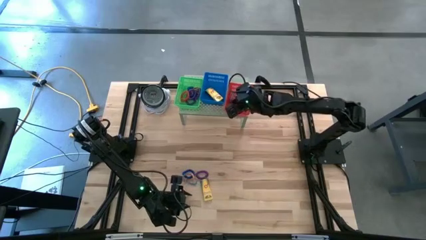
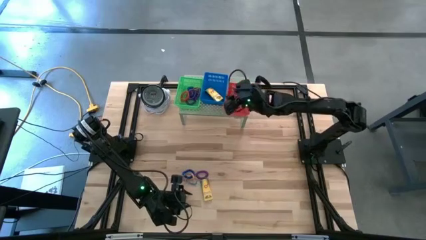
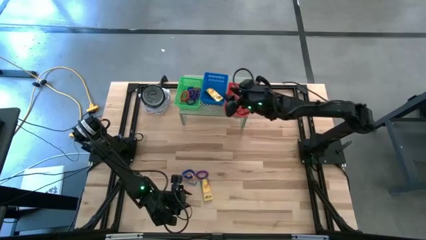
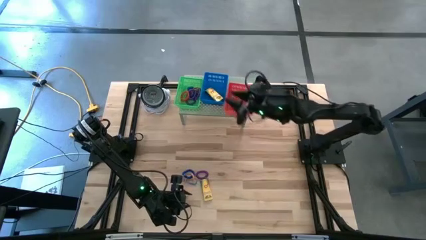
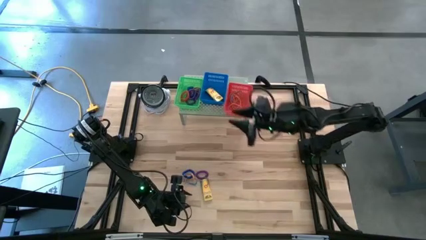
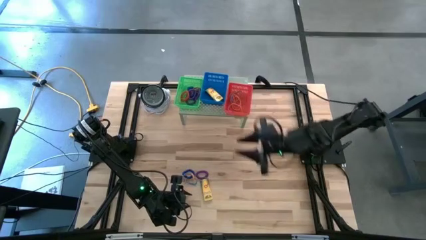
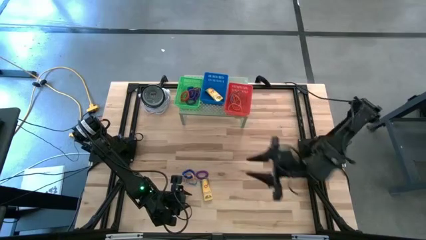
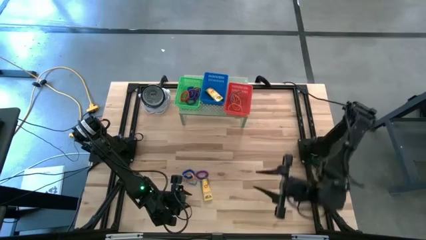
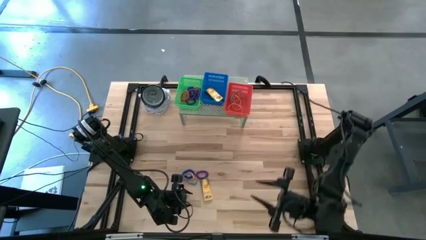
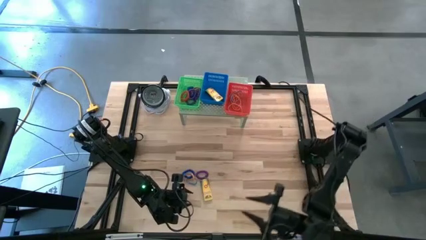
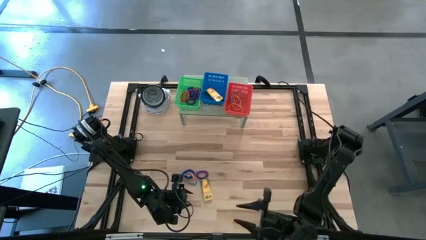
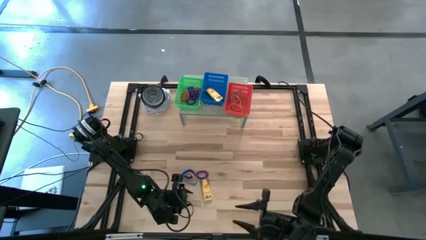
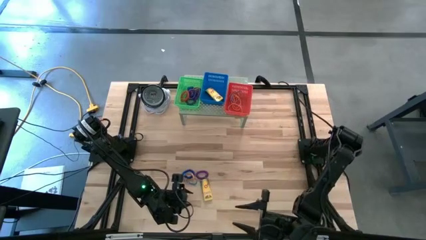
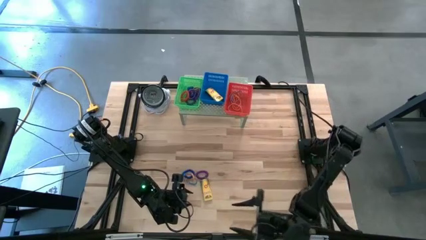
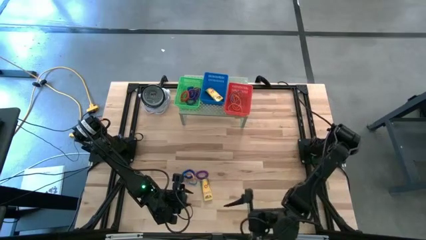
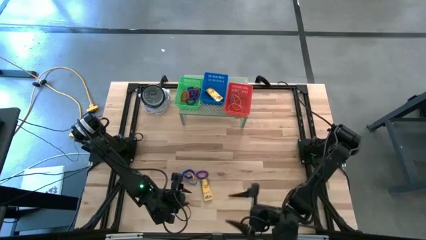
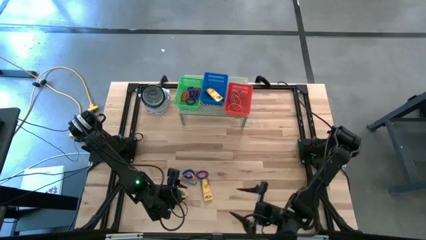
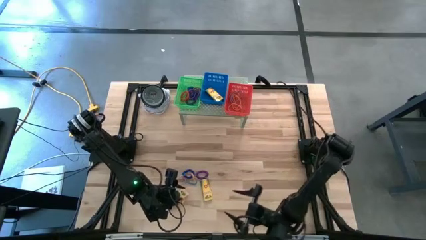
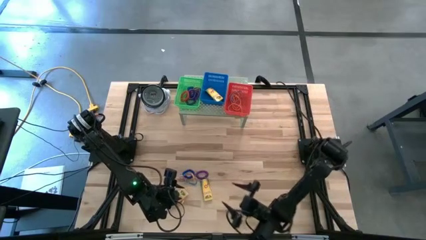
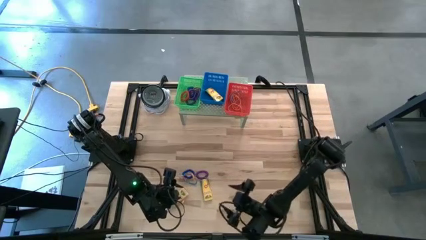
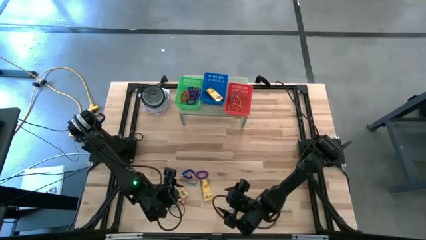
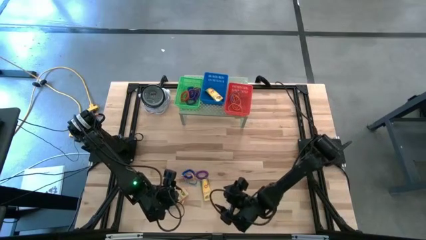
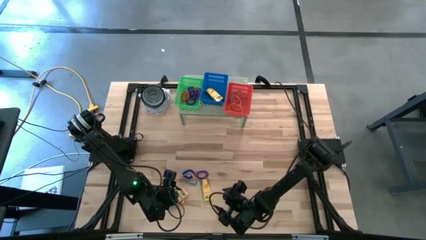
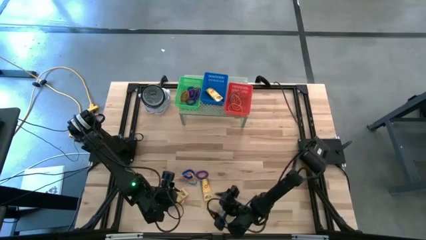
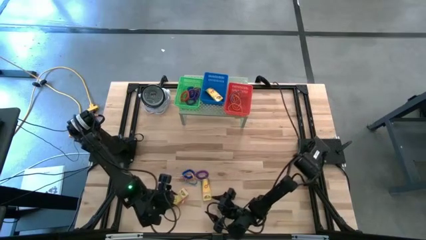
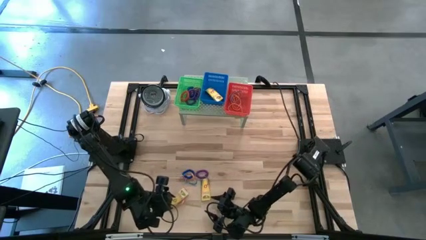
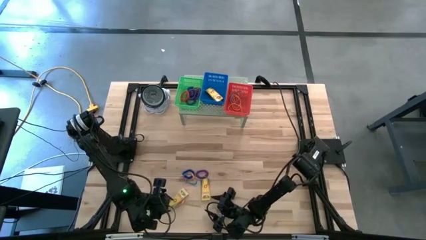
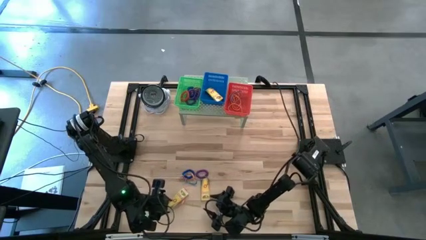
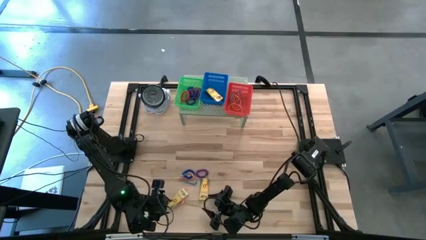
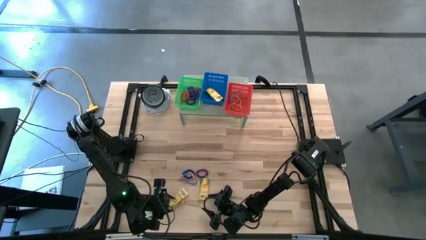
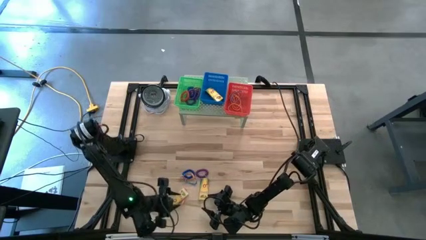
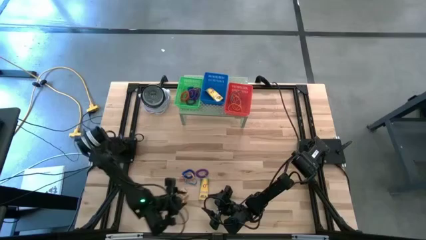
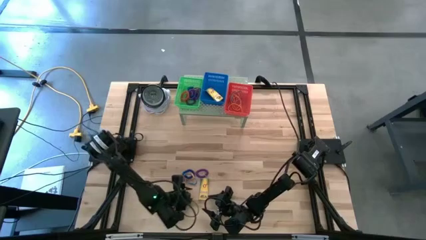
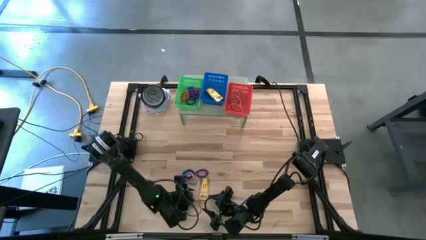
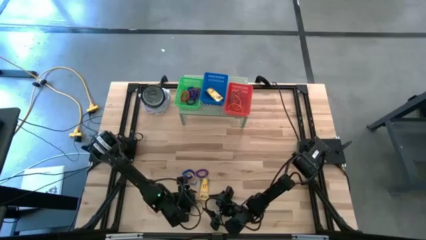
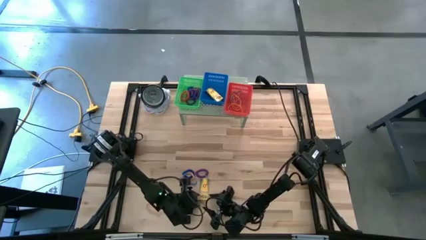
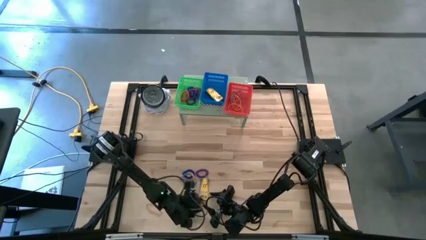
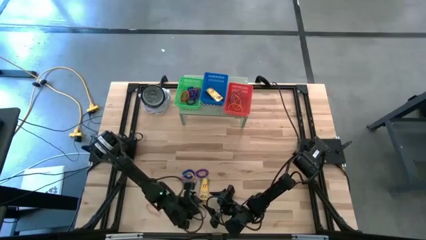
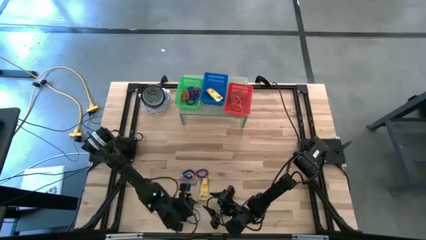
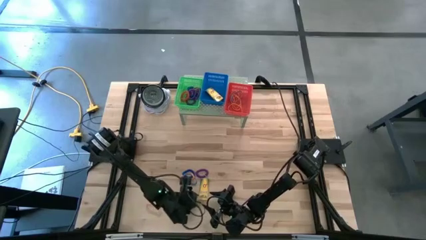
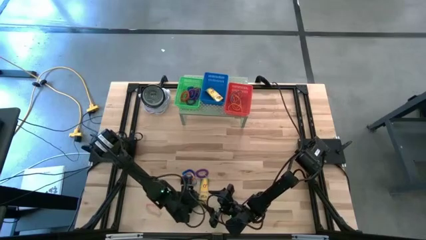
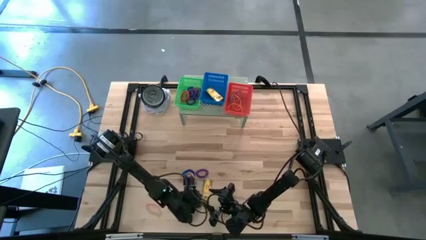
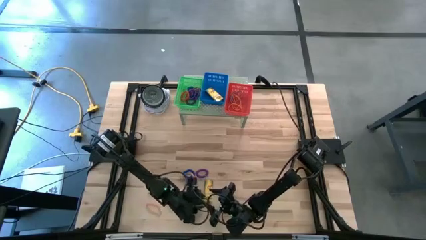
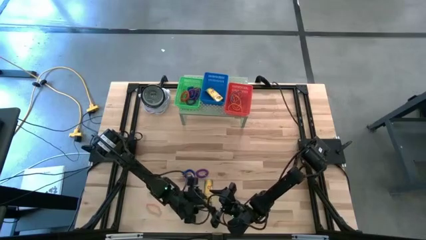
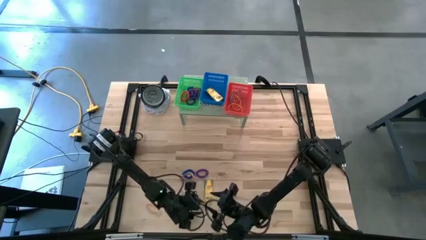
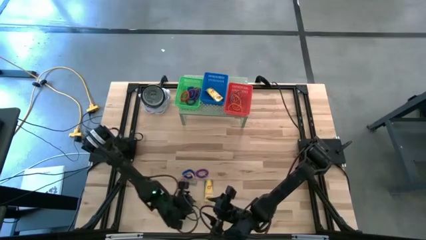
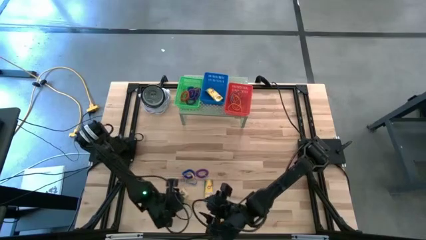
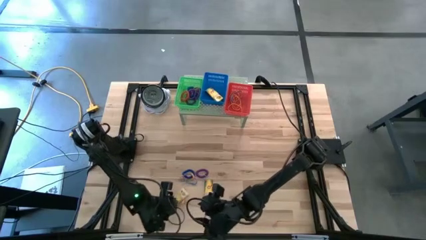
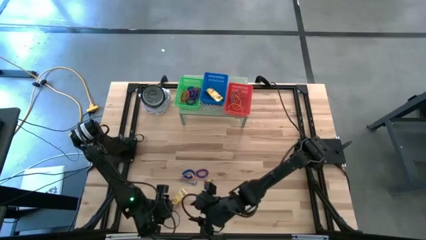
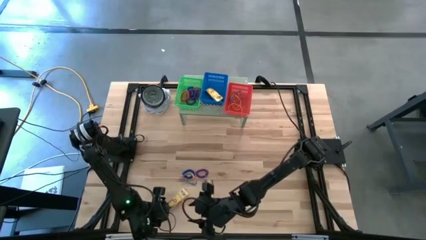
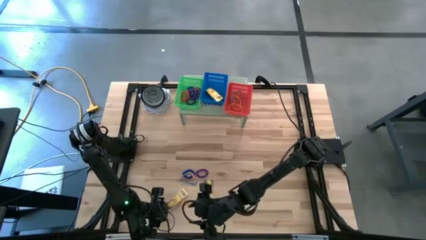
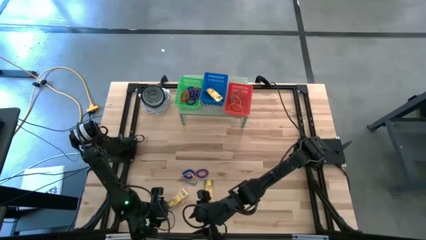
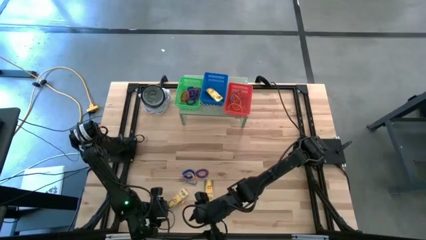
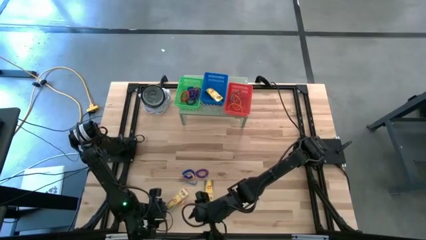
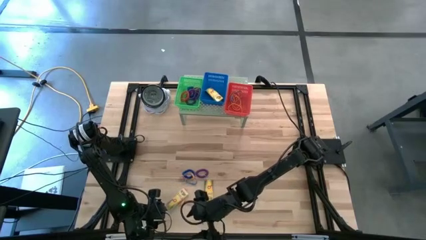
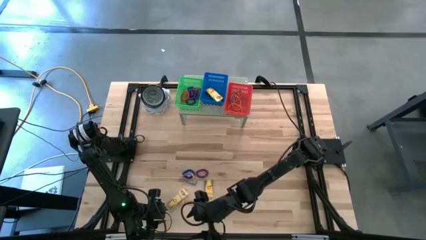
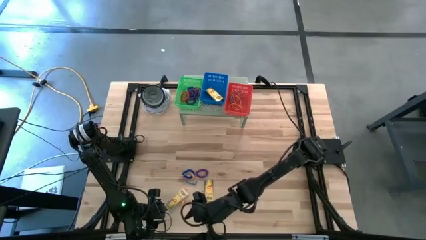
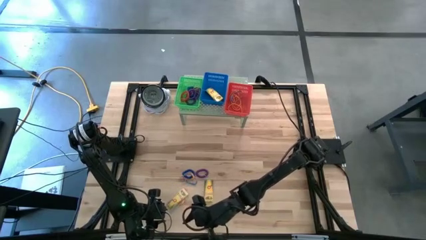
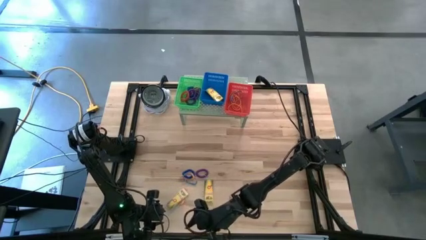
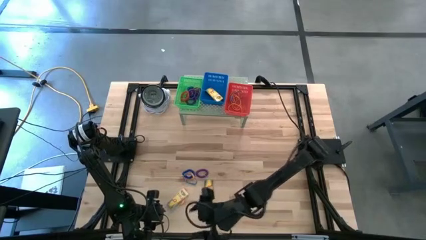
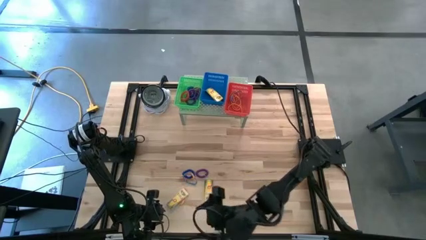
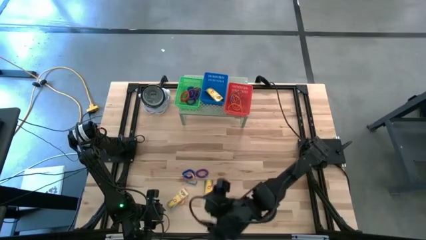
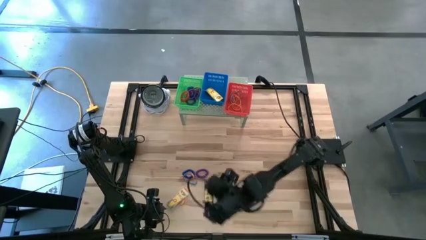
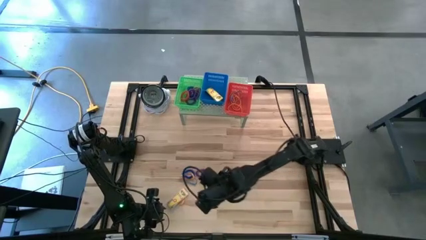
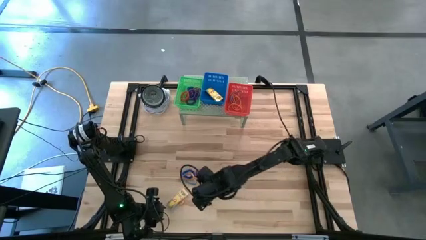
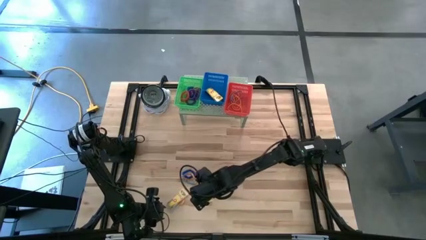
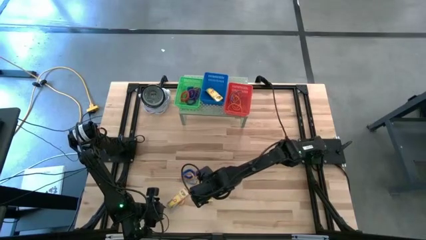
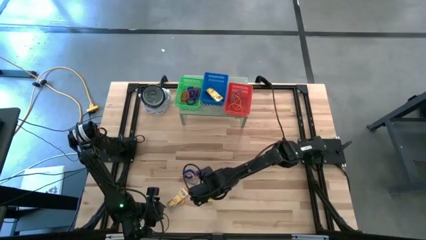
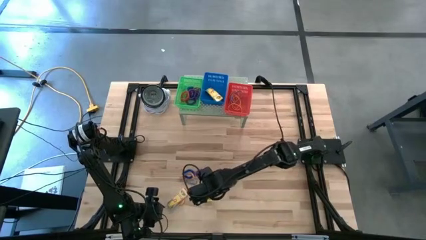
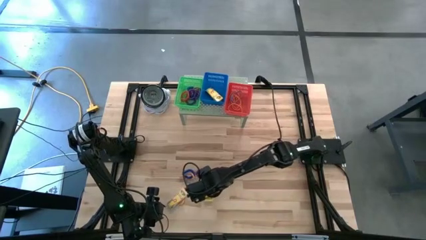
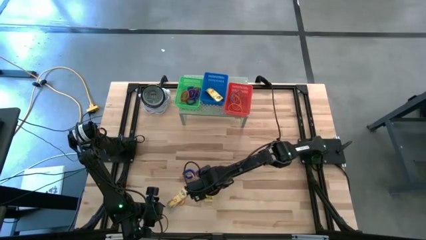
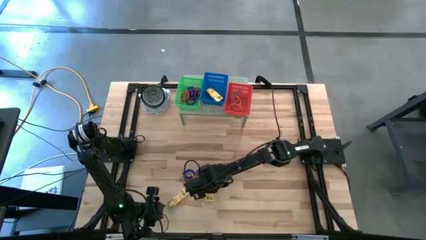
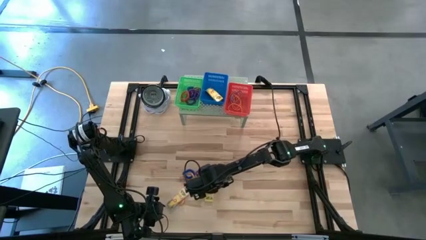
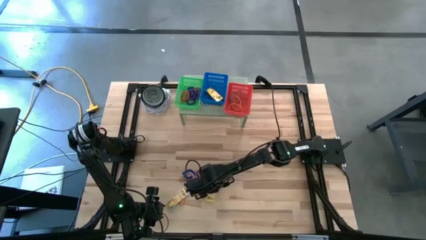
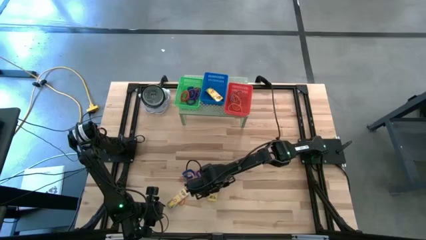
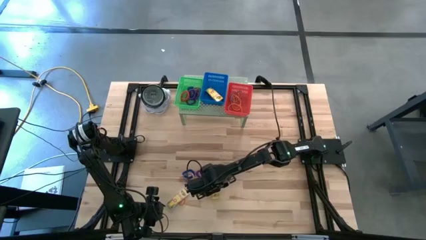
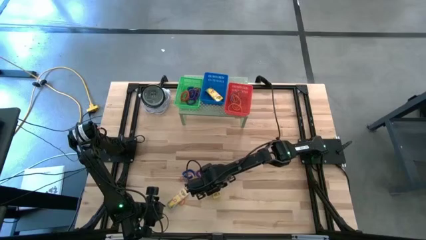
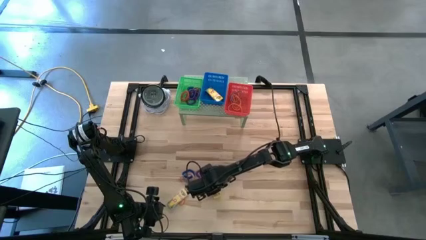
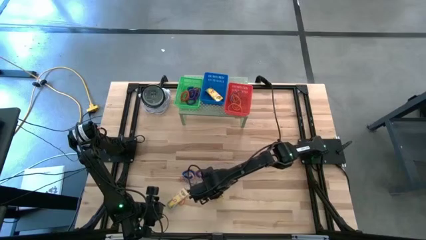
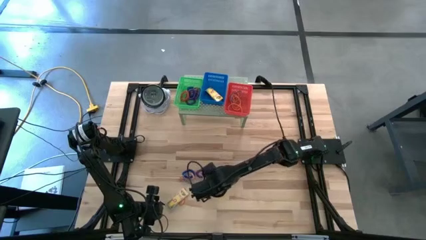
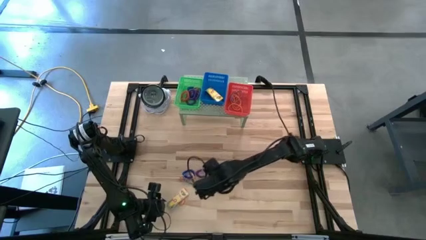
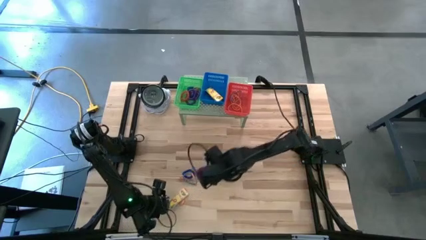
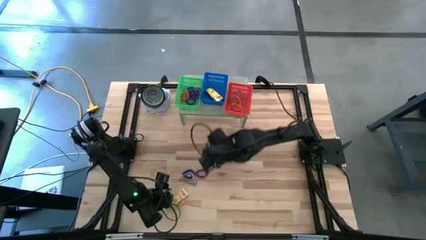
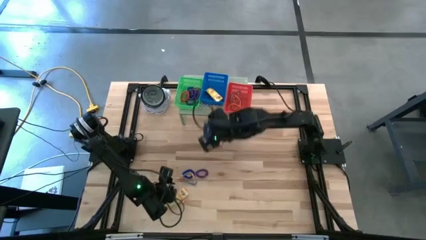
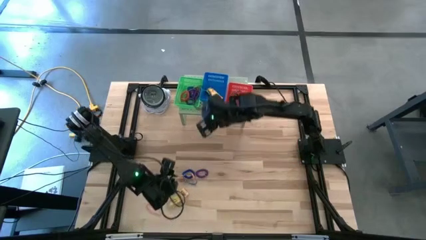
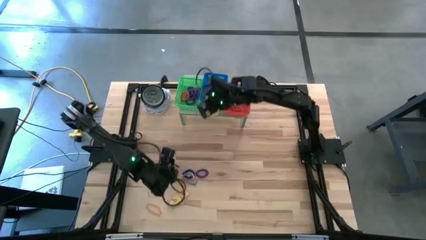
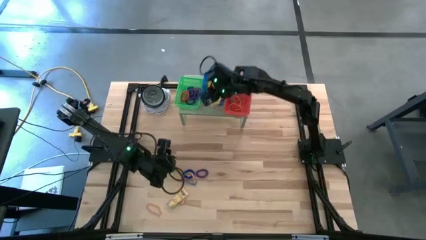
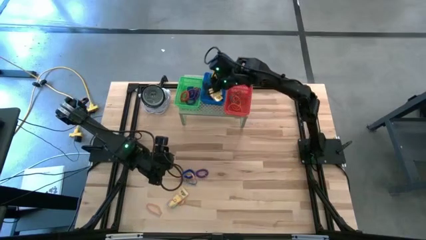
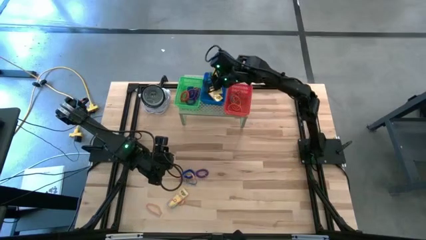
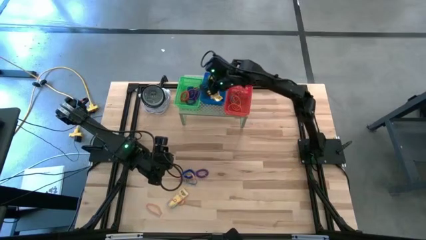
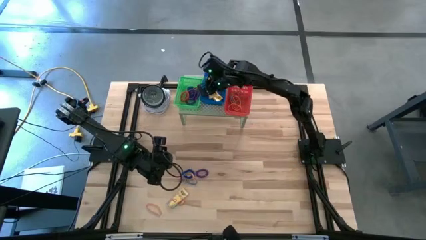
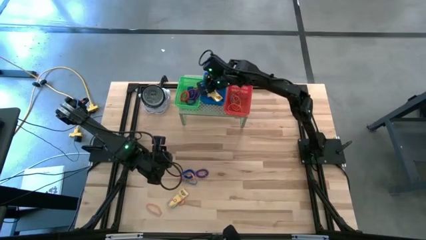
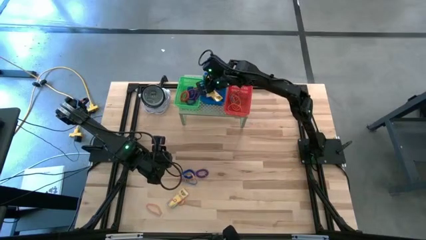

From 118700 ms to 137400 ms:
Task: Pick & Place Office Desk Supplies
Put the yellow crayon box into the blue bin on the shelf
